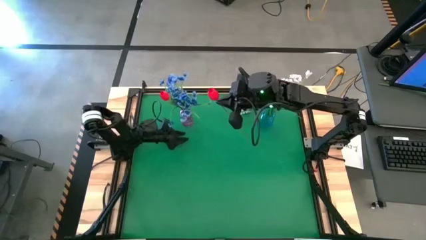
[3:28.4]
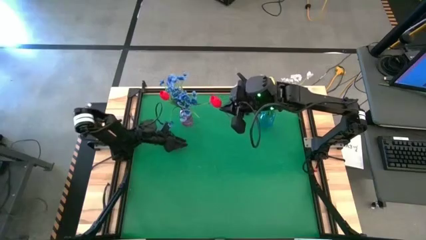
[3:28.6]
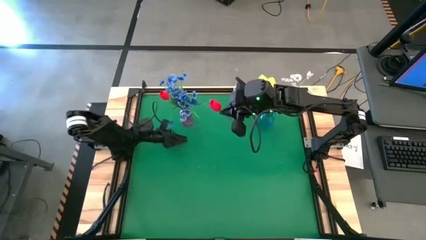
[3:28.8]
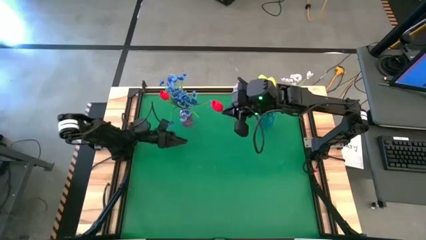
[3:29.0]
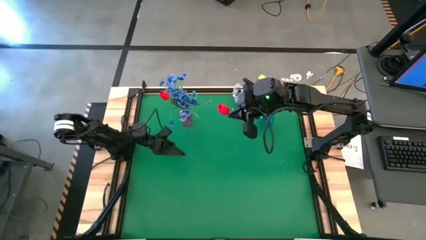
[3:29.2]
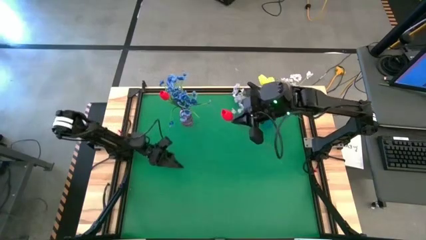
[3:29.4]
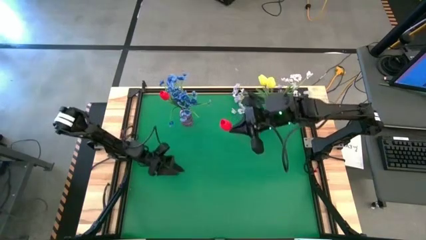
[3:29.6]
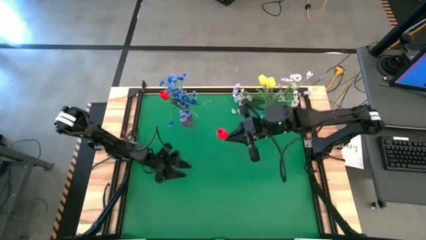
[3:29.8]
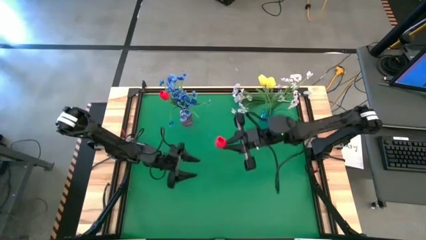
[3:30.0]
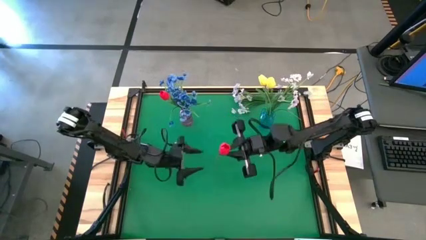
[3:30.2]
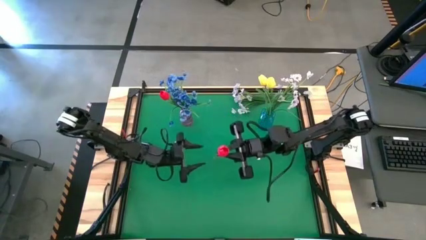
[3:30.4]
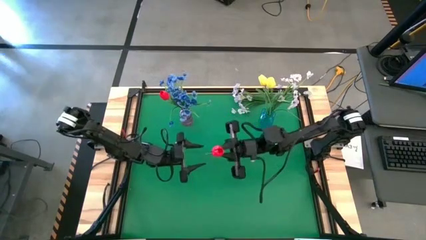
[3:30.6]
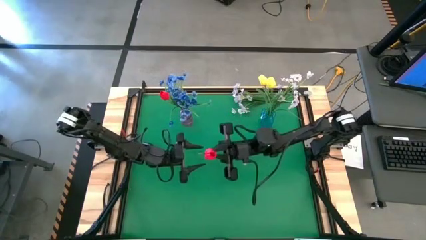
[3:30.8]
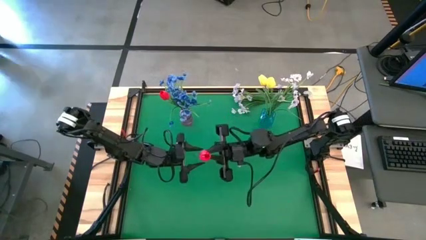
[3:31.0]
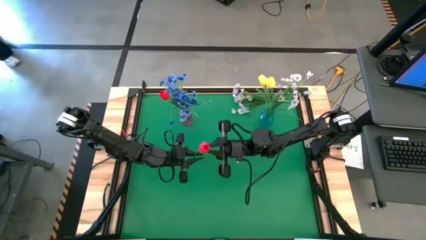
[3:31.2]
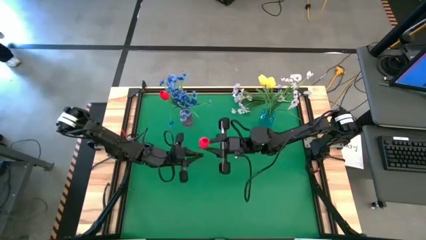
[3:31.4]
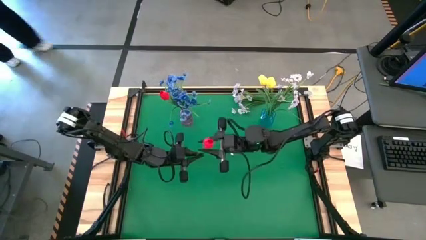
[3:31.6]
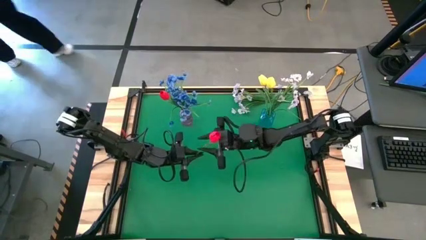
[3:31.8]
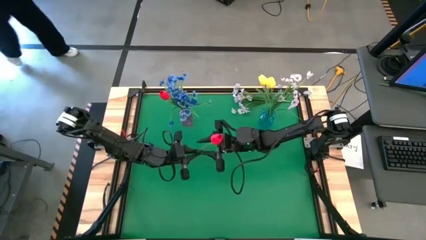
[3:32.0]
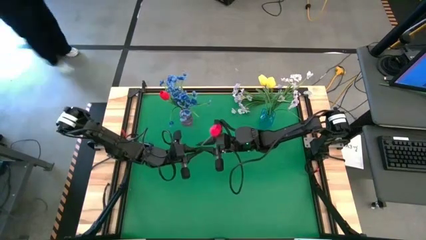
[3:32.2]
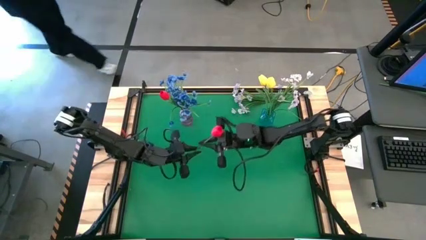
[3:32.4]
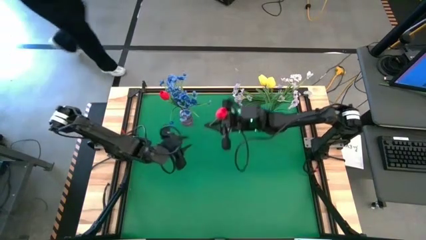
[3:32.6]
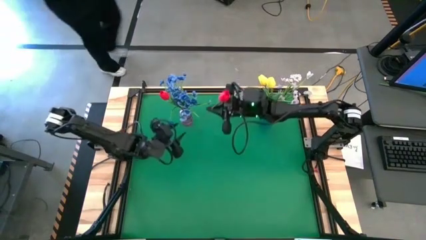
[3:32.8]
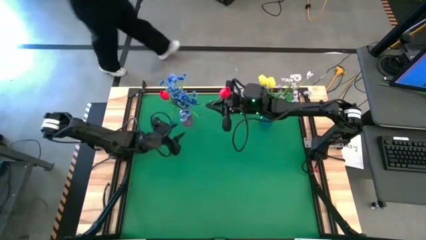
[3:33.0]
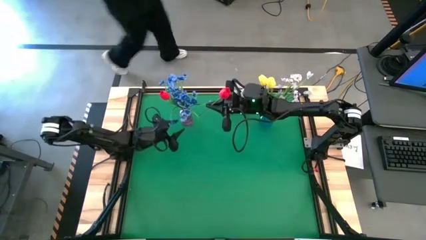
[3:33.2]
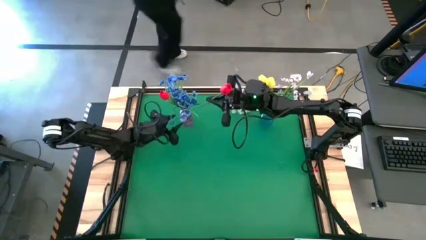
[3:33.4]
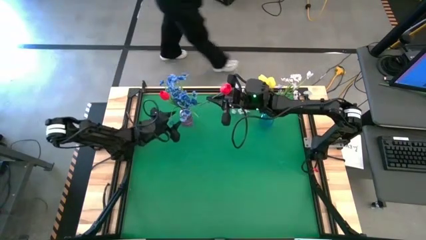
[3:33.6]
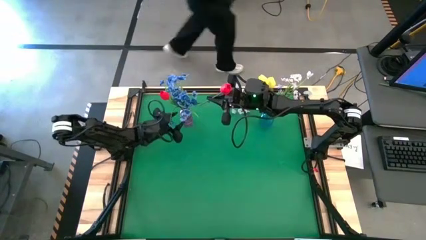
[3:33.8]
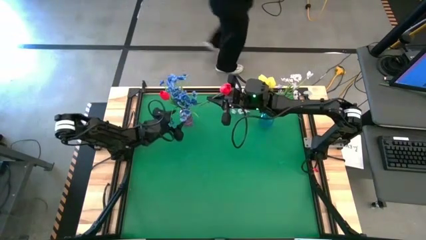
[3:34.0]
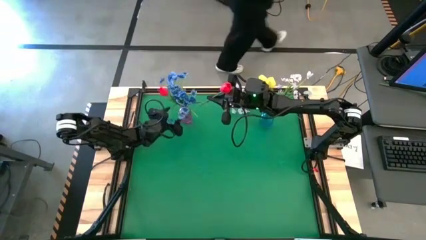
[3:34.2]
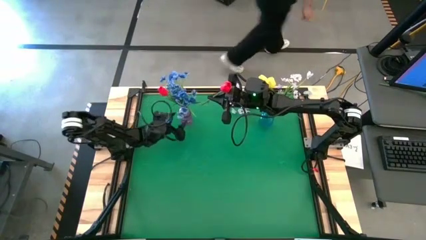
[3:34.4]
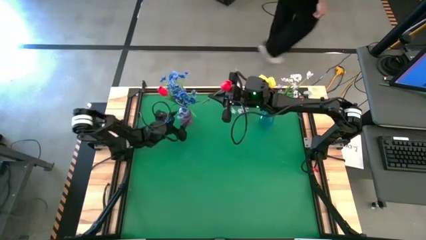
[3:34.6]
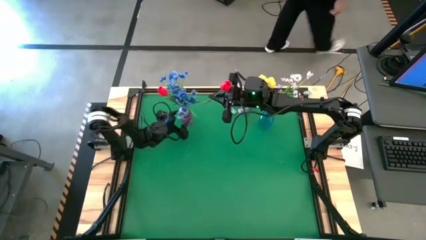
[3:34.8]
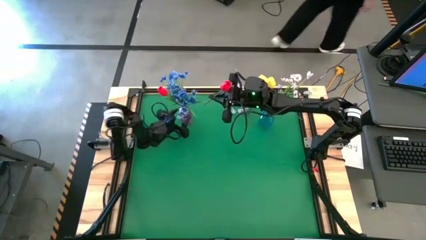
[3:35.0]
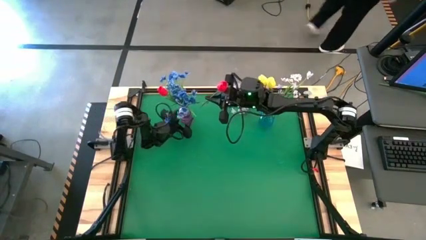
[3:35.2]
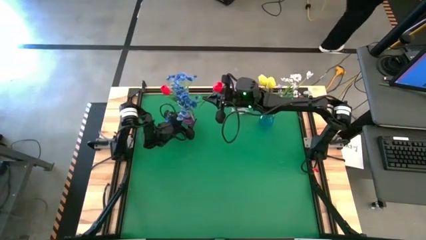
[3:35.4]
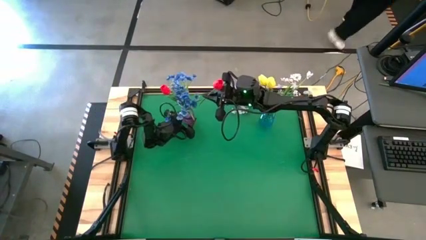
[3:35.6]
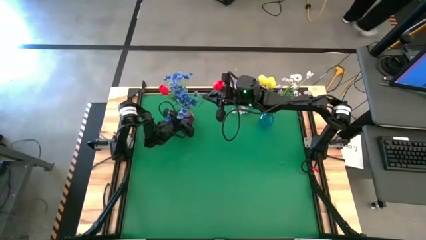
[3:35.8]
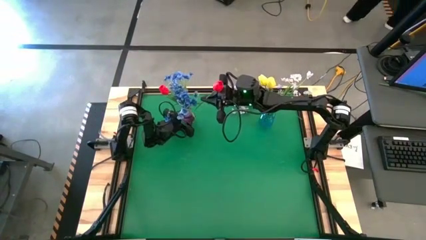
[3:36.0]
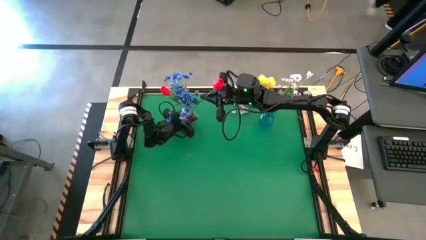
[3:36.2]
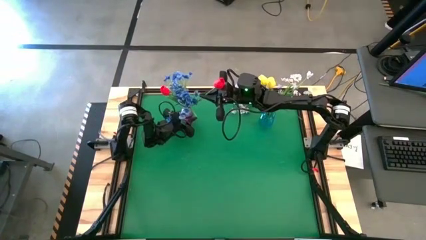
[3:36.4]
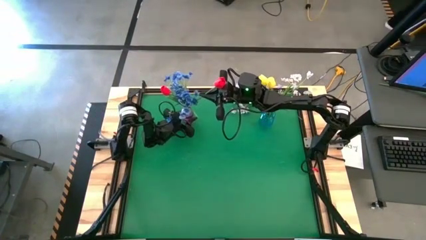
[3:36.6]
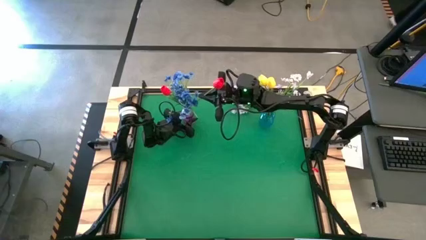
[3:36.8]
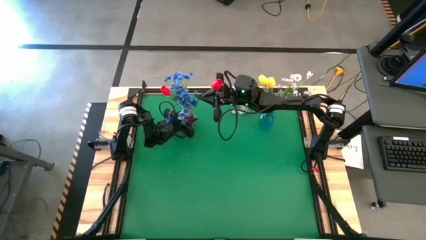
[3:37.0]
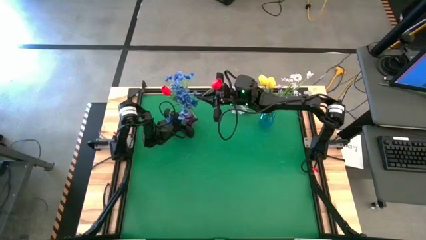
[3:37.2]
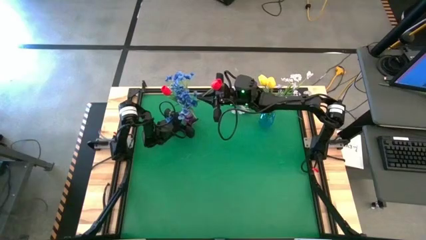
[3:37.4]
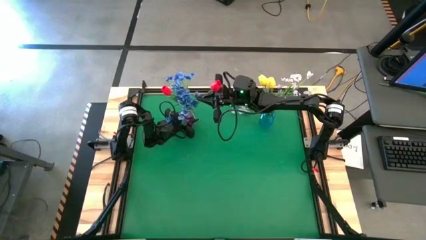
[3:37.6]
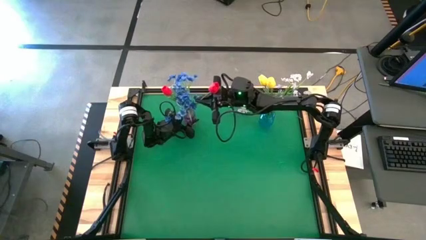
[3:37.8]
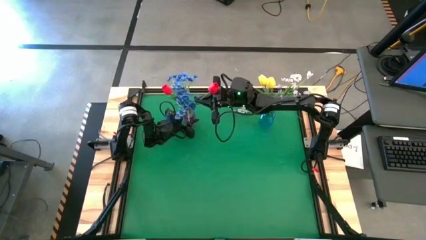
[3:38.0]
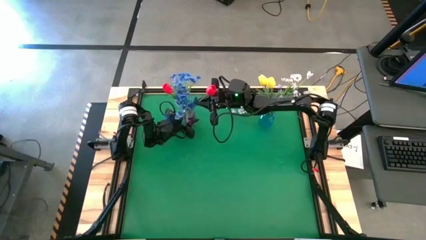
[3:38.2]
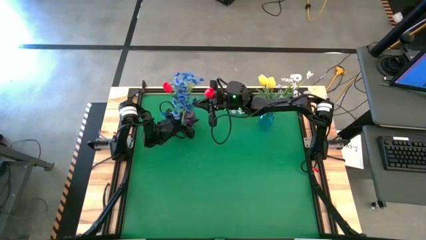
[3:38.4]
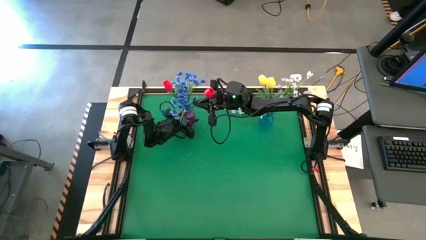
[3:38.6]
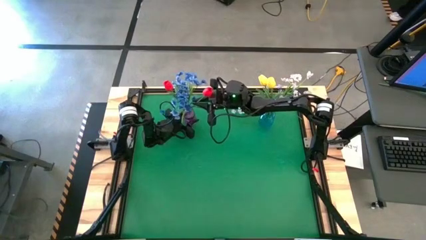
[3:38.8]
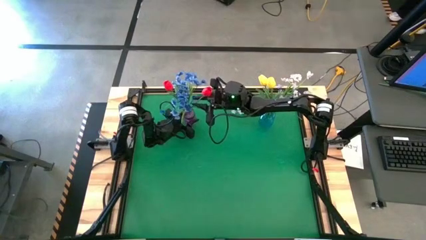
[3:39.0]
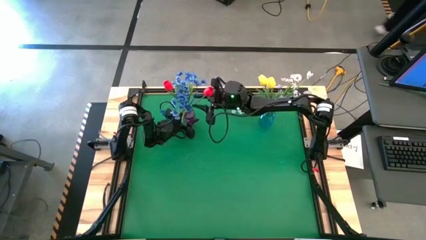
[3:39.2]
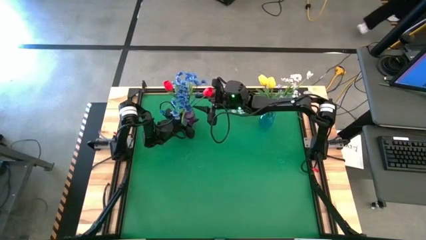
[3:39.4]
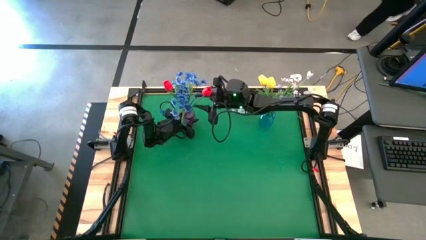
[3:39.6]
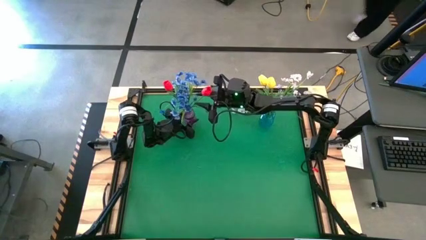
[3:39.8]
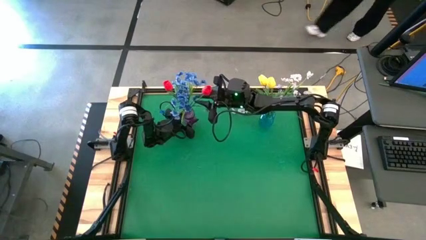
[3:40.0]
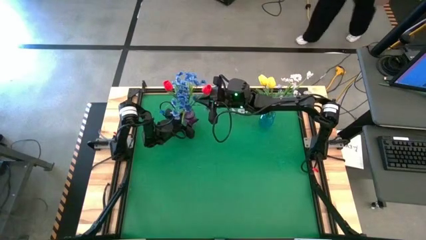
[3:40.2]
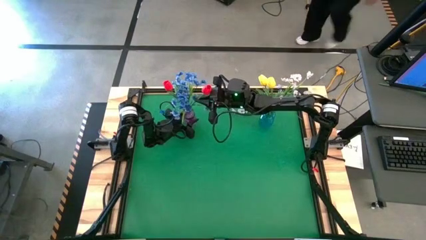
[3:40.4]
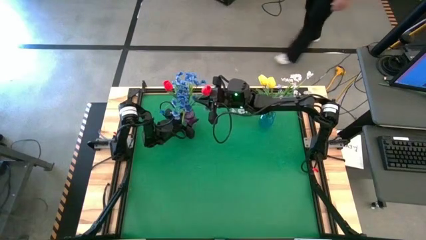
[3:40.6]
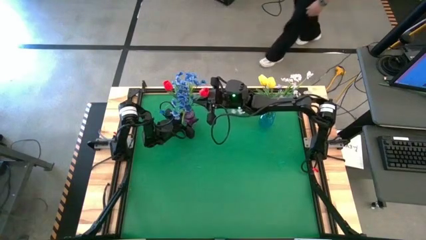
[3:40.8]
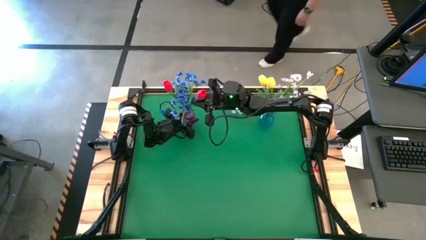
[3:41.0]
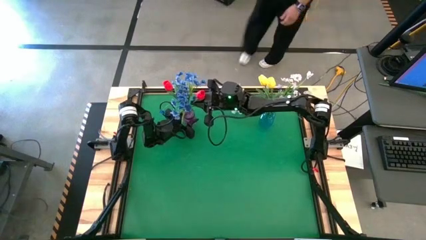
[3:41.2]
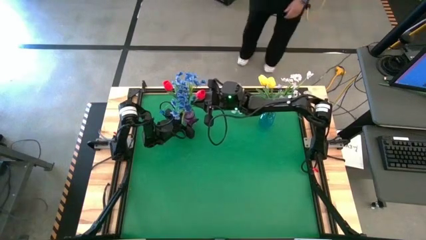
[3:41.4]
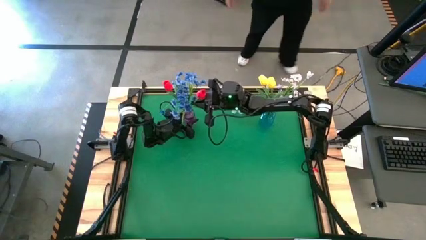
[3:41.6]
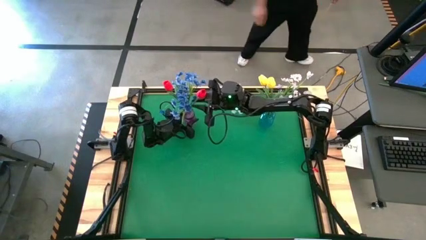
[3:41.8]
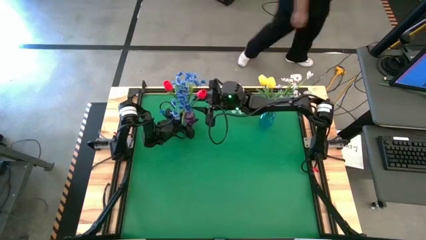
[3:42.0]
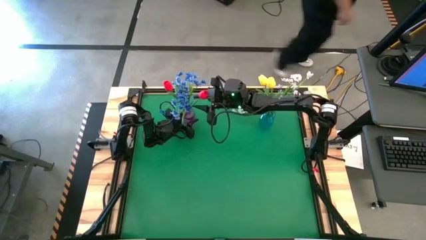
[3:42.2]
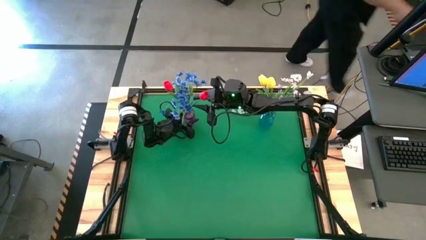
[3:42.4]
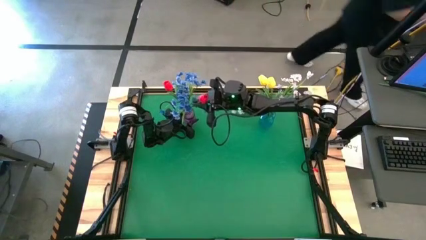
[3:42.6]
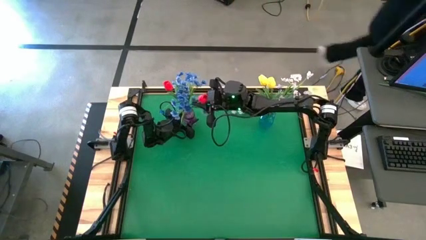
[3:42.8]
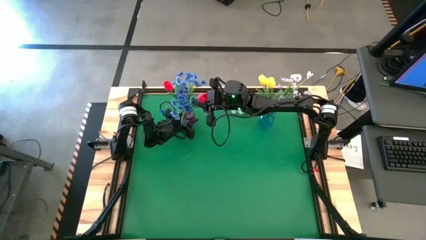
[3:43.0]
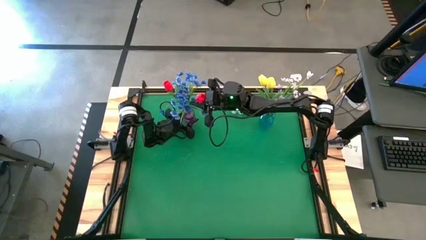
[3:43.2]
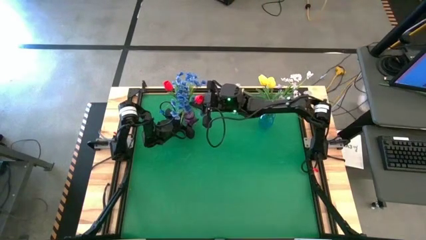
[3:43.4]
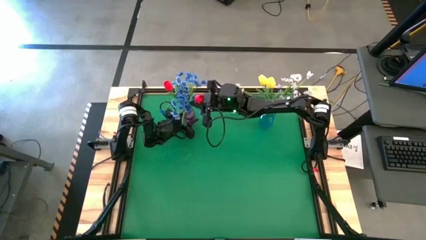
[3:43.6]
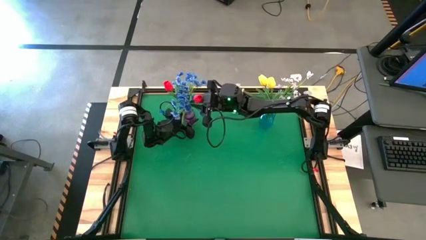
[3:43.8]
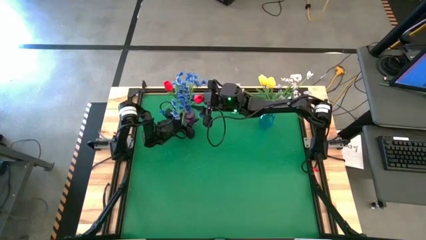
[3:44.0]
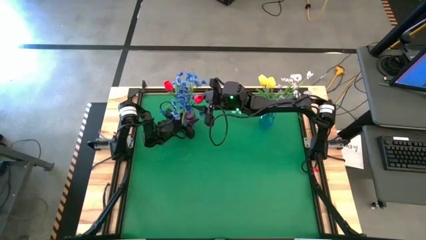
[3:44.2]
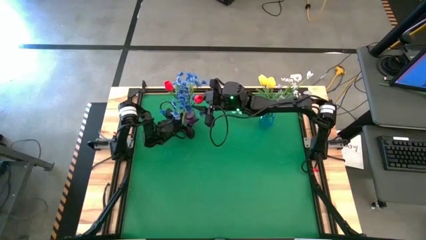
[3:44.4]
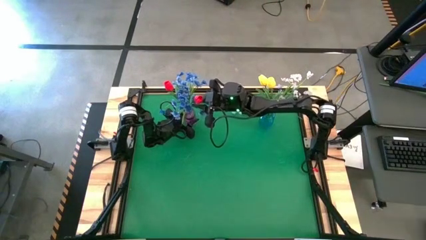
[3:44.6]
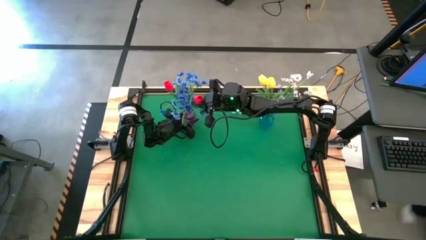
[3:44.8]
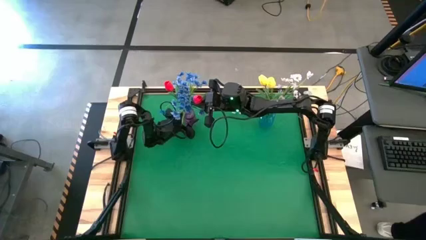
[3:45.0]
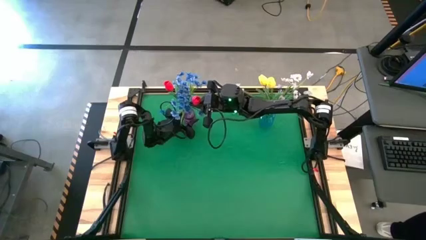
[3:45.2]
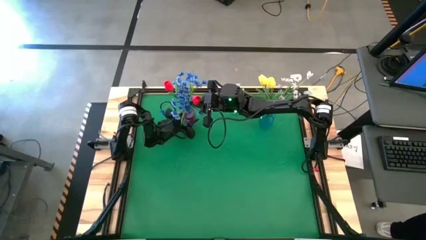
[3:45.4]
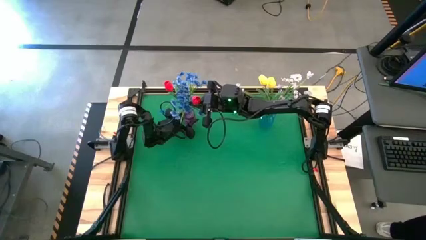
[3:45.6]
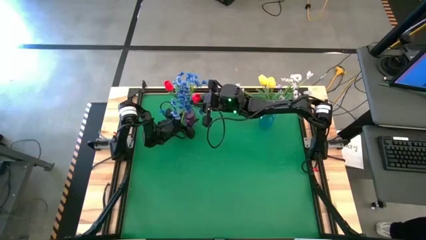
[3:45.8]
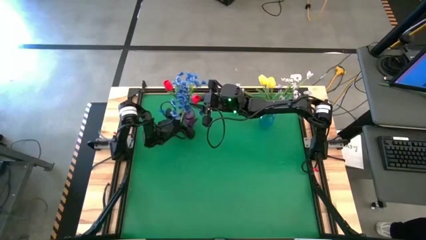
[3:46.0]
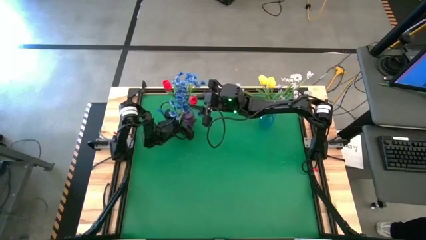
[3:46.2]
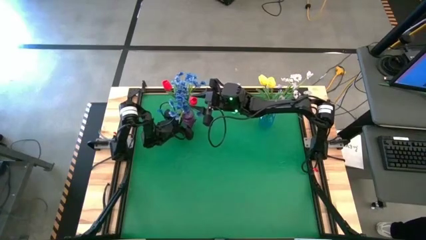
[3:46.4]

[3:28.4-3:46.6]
Task: Sort flowers into vase by color
Put the red tulip into the purple vase
